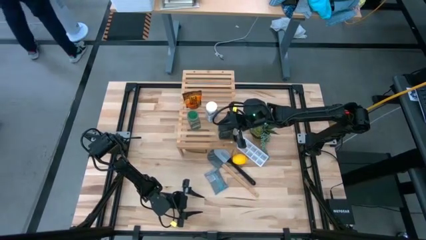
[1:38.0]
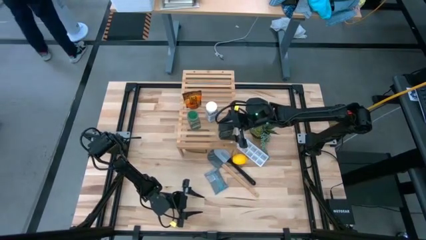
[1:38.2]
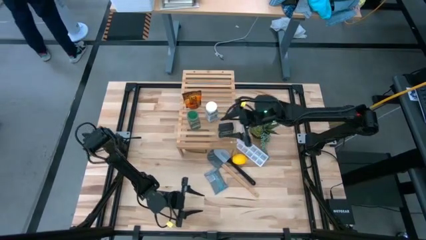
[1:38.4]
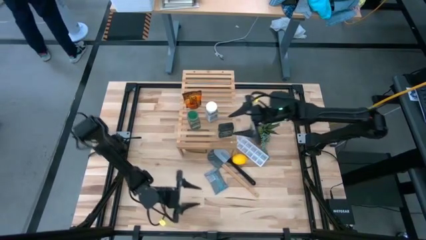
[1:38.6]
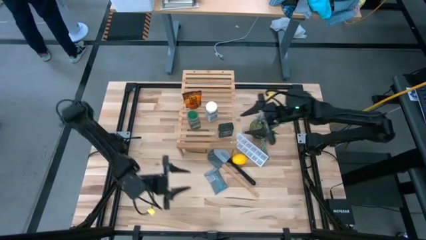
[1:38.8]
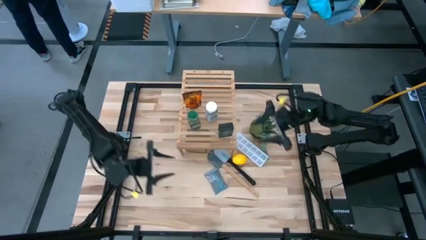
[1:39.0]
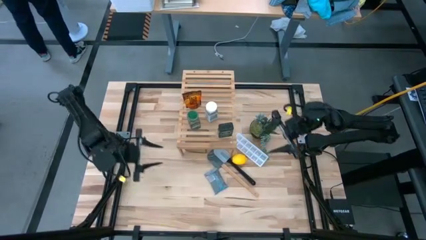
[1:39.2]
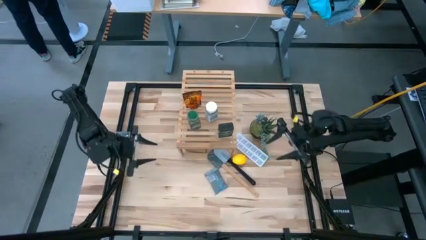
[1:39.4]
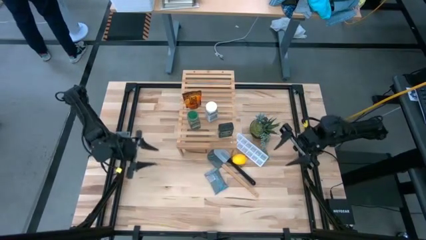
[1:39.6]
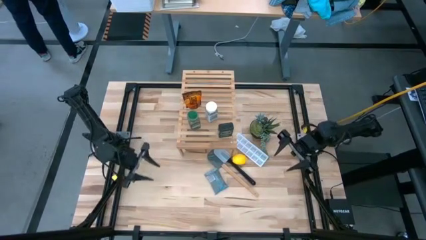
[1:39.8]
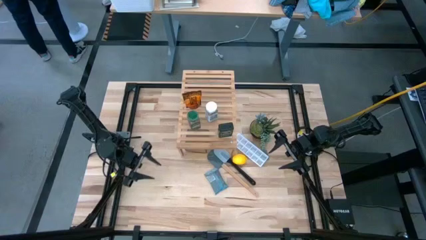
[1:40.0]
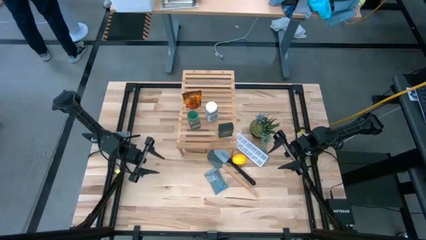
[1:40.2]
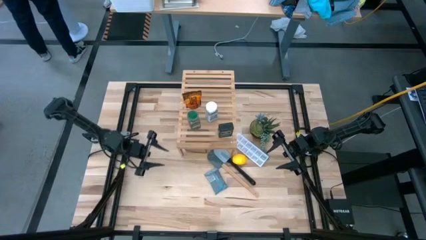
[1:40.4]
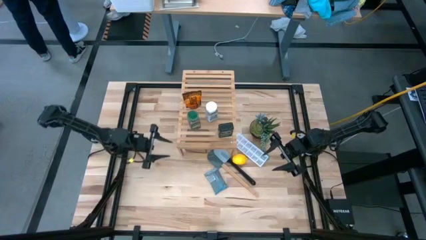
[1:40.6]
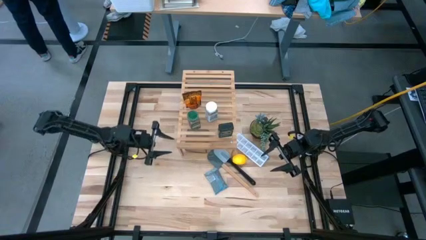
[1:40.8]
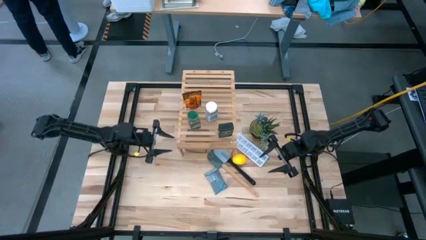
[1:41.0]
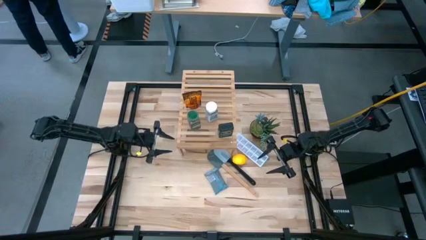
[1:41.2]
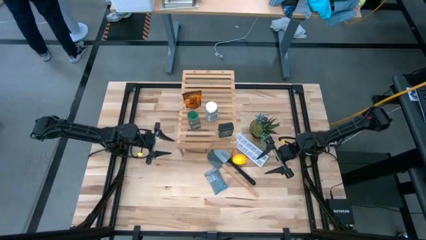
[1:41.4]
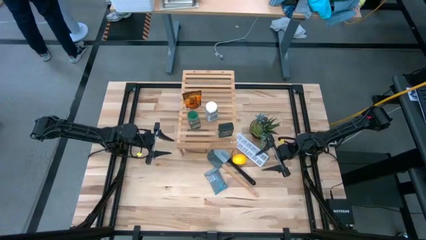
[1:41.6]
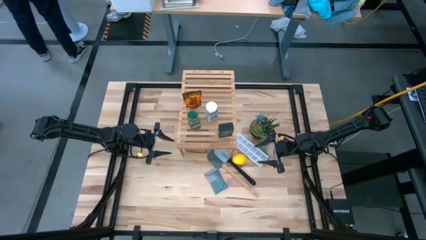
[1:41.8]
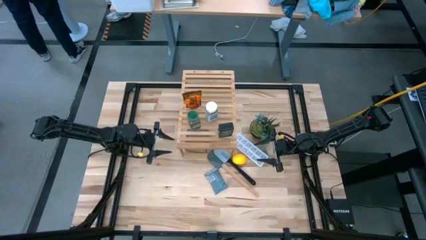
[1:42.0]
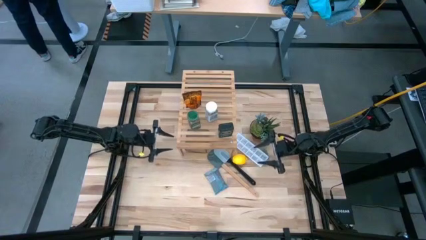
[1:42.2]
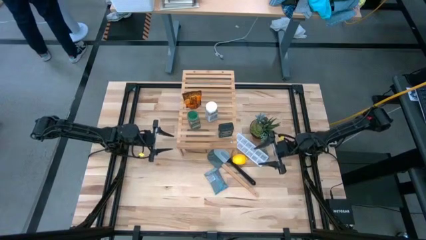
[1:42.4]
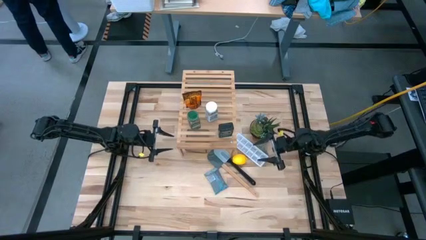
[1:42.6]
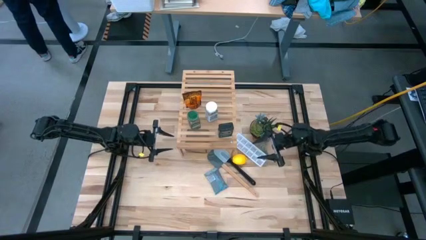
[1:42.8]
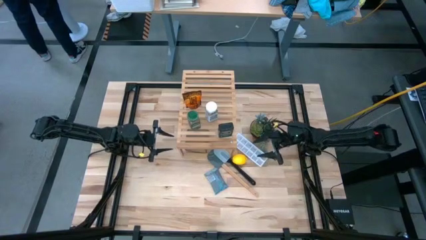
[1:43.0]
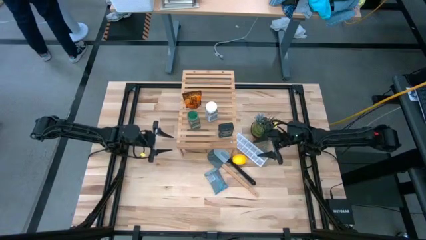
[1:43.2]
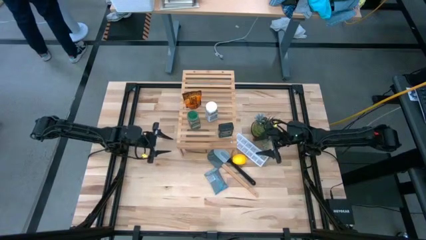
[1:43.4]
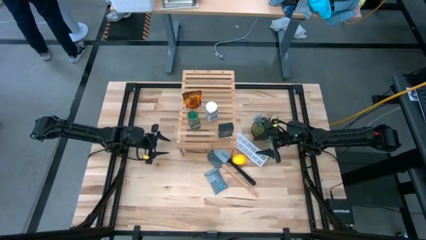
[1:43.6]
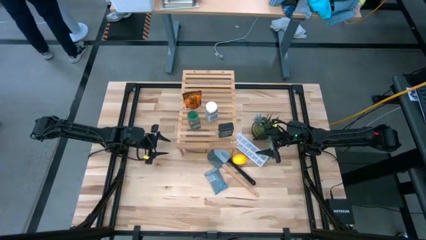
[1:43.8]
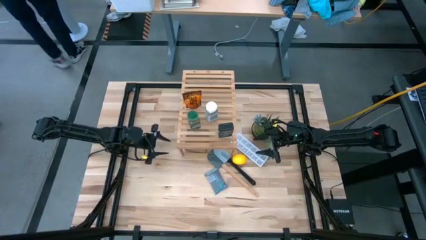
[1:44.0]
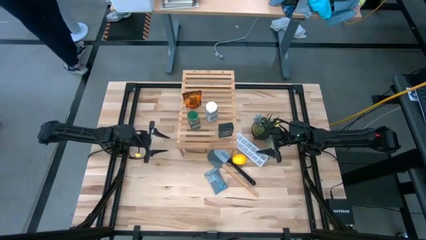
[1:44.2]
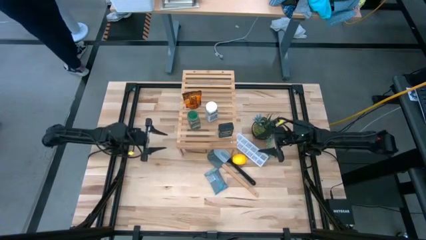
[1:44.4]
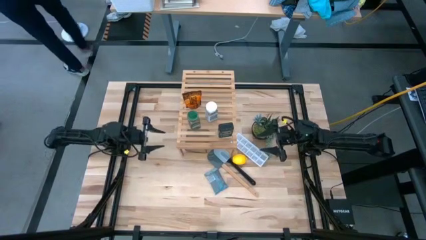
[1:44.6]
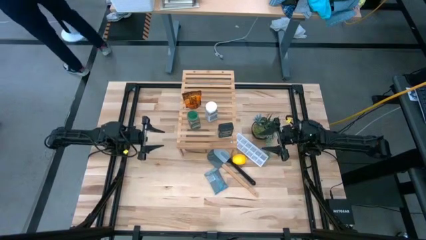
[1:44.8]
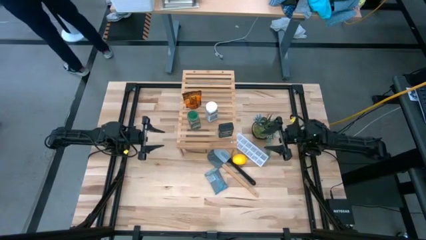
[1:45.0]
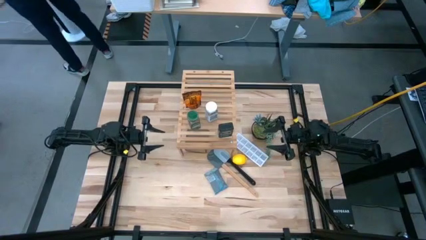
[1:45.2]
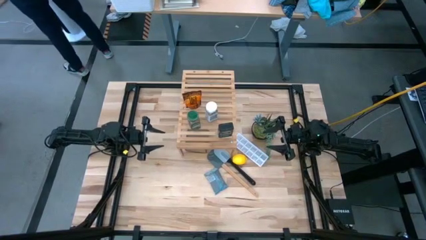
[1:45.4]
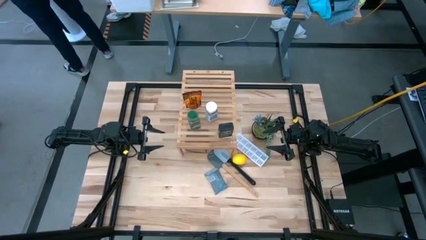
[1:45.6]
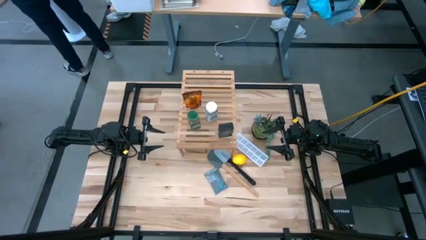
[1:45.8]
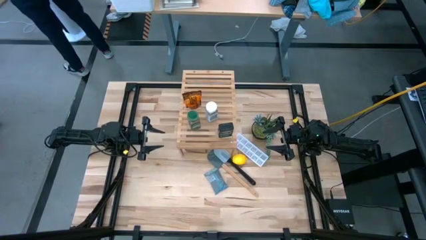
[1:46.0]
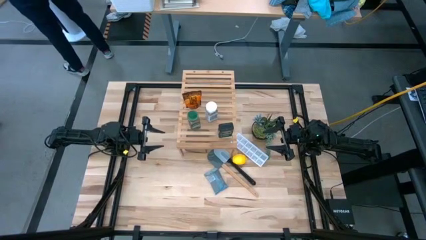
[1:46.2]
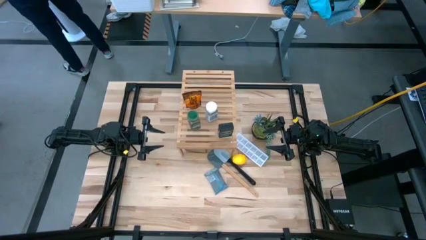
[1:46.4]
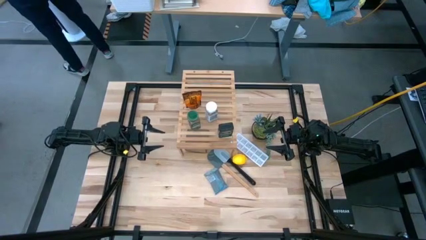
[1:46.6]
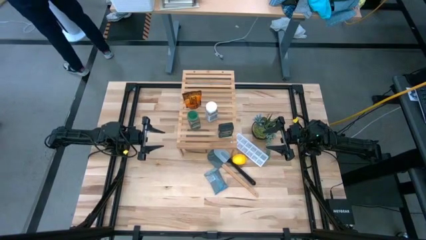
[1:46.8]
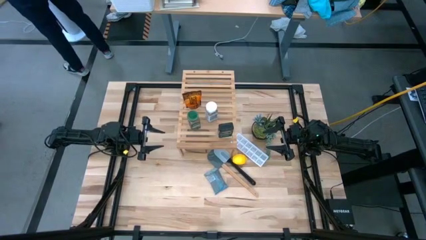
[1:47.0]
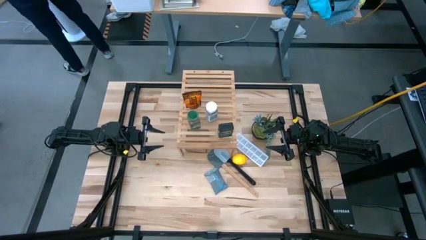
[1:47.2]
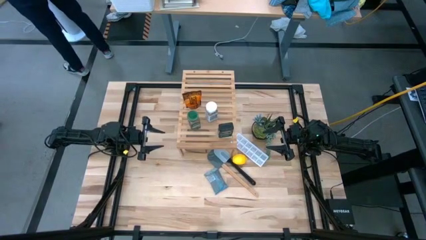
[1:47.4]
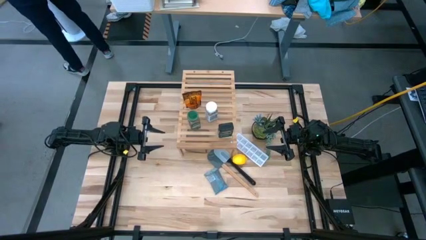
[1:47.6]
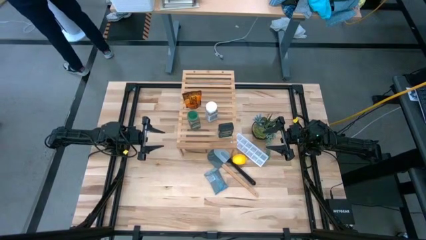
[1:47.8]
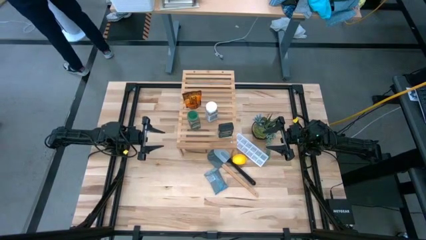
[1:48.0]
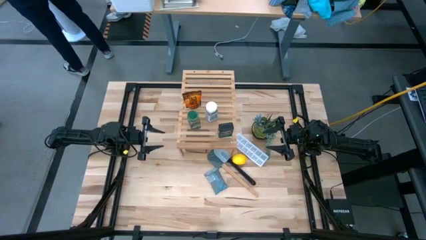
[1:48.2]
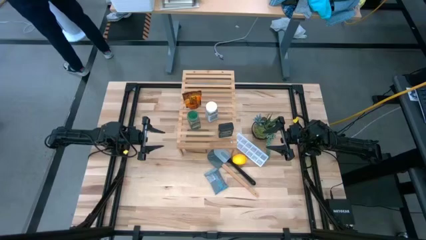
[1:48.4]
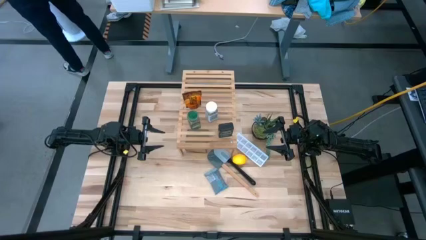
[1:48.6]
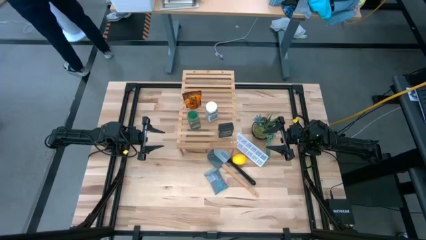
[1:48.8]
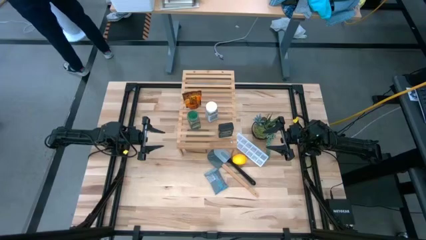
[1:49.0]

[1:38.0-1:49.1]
Task: Shelf spices
Return to Home Position

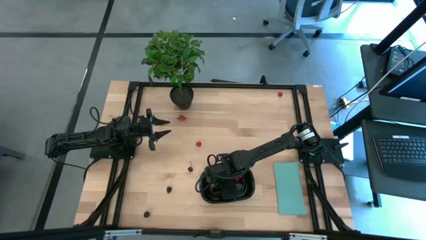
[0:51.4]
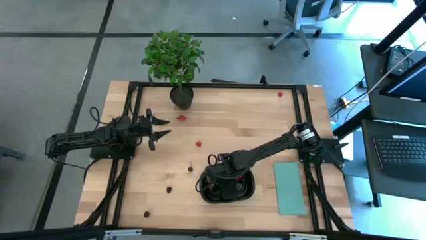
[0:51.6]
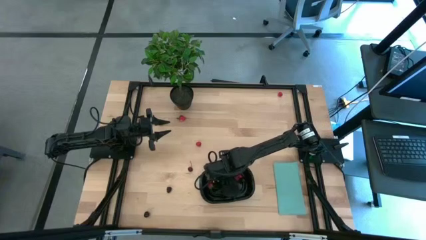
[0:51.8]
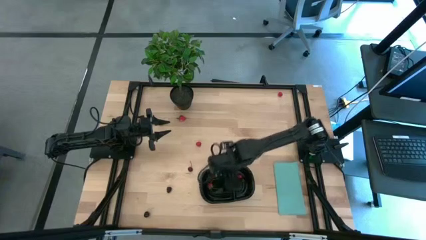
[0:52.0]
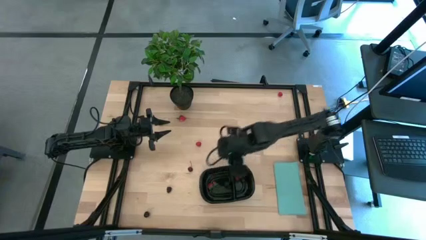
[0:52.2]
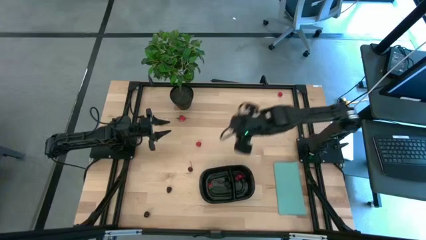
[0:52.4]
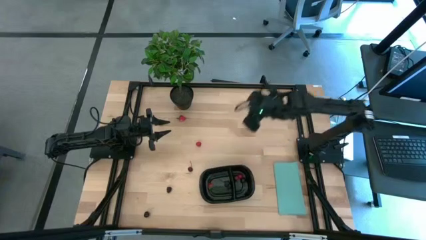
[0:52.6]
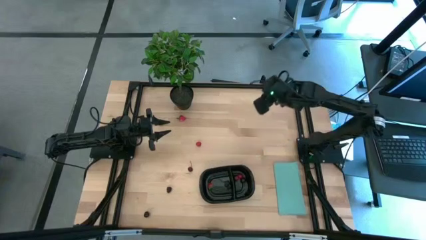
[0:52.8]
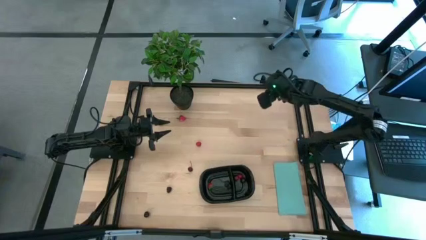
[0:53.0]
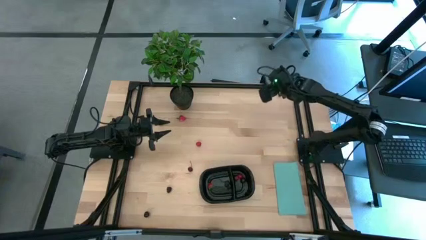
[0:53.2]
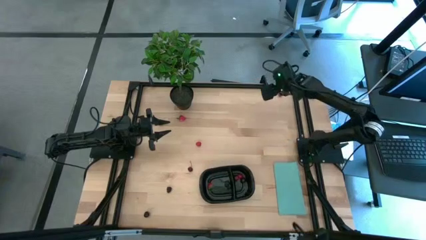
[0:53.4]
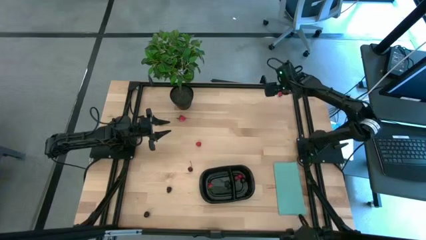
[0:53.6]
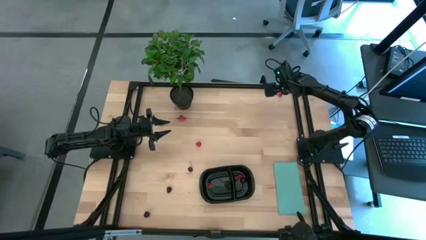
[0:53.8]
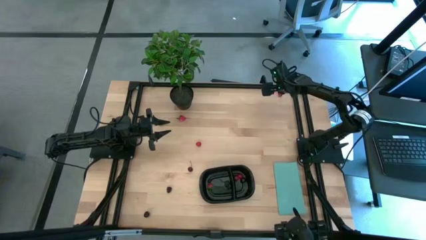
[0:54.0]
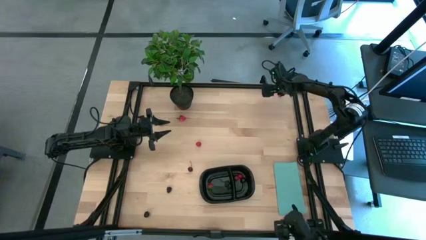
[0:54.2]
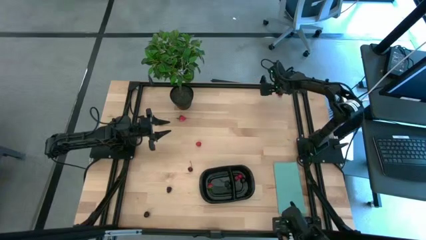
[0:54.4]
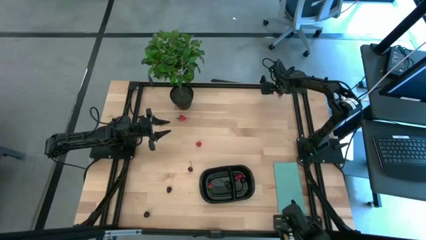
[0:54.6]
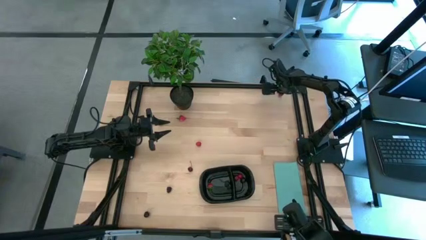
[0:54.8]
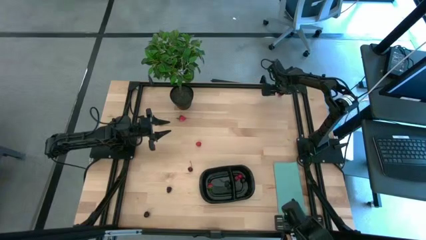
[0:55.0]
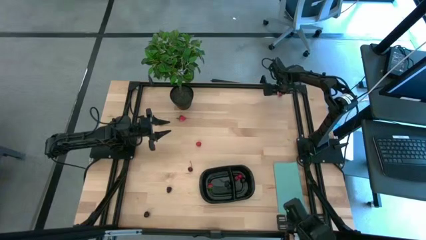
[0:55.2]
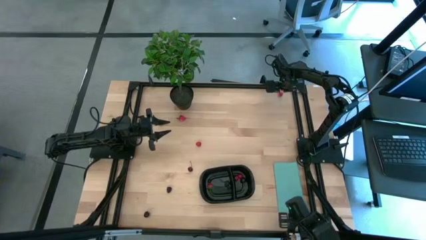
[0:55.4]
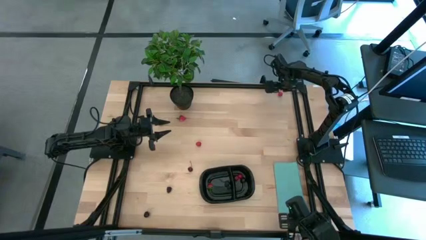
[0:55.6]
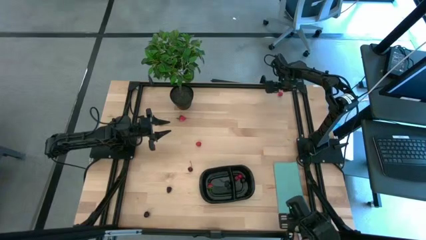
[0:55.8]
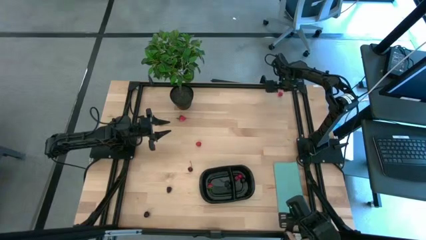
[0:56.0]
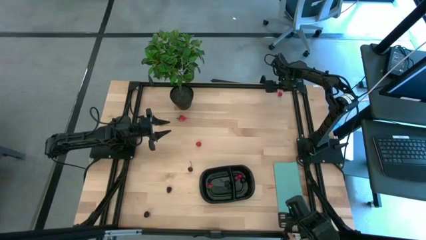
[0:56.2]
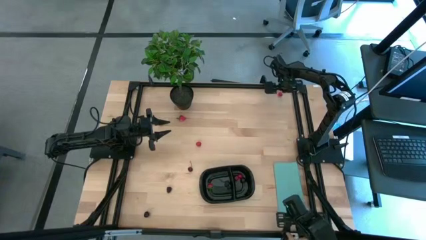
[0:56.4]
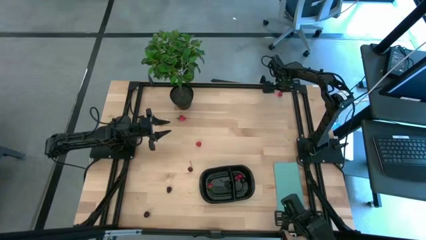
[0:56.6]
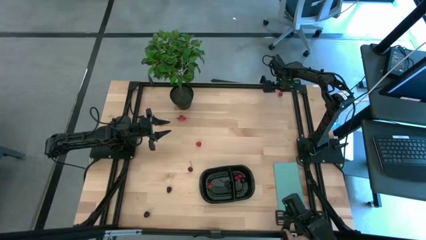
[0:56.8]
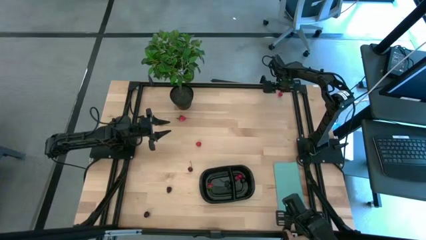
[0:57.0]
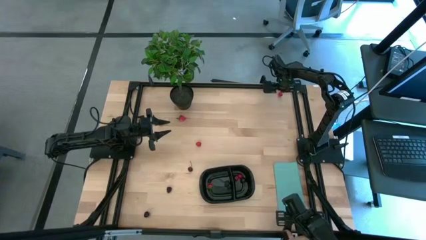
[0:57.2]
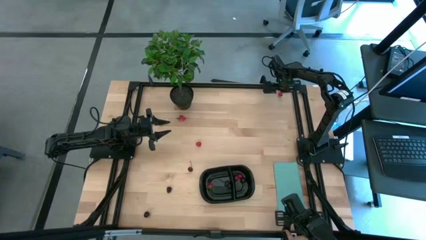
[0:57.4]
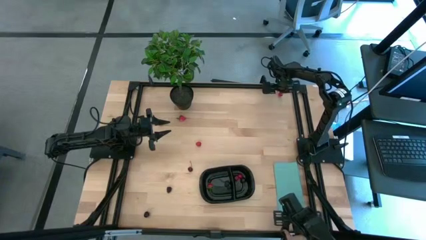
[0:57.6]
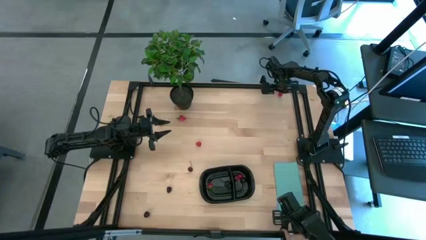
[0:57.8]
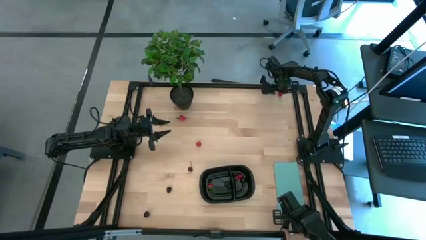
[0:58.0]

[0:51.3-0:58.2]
Task: Pick and placing Produce into tupperware
Put the top raspberry into the left side of the black container
